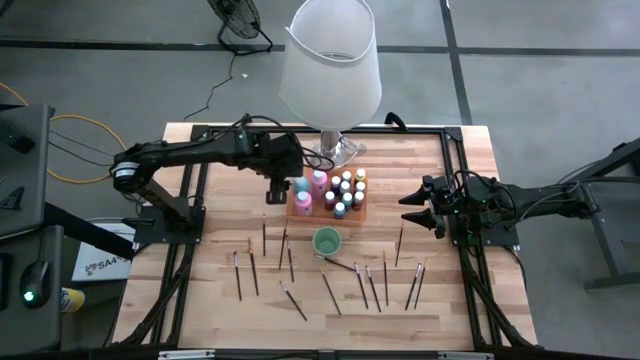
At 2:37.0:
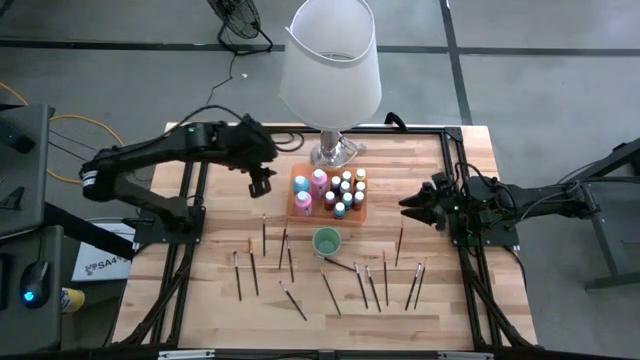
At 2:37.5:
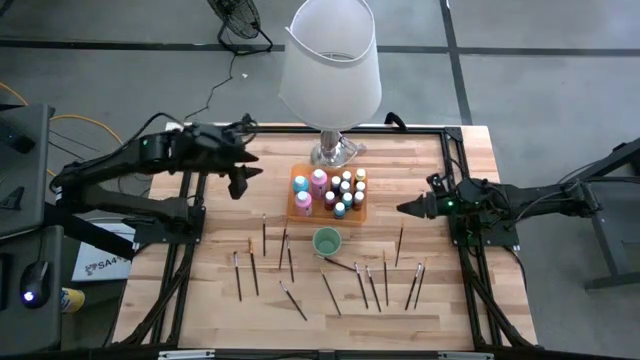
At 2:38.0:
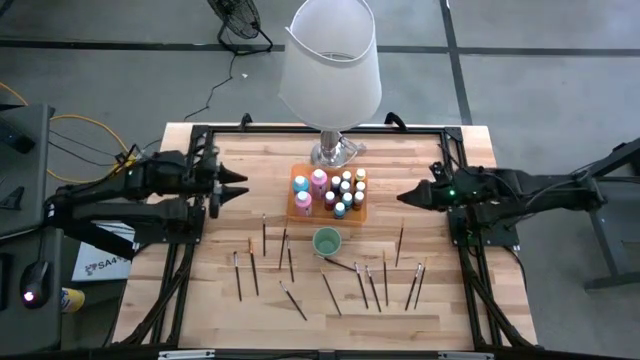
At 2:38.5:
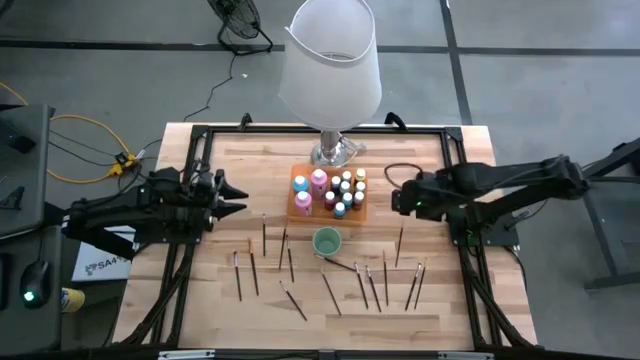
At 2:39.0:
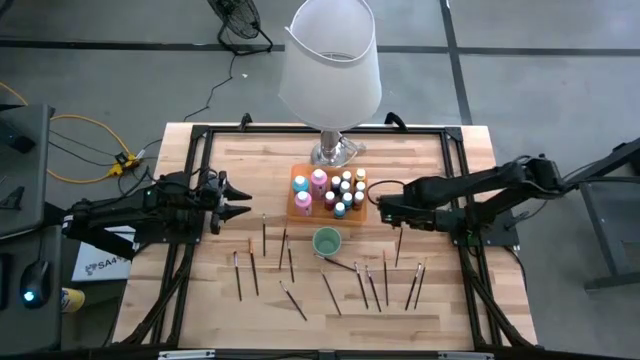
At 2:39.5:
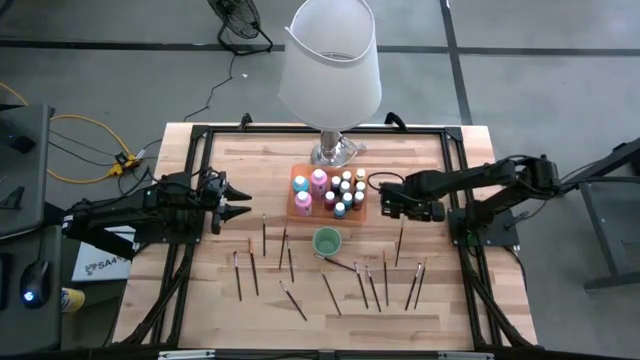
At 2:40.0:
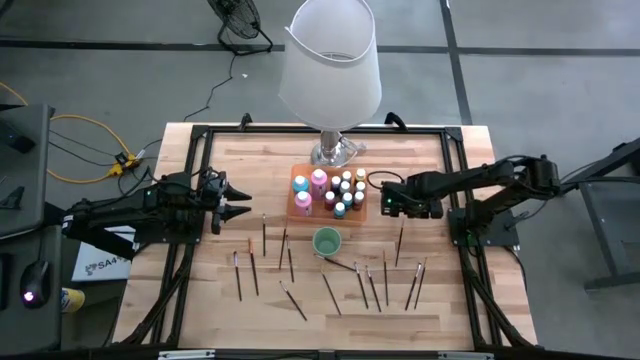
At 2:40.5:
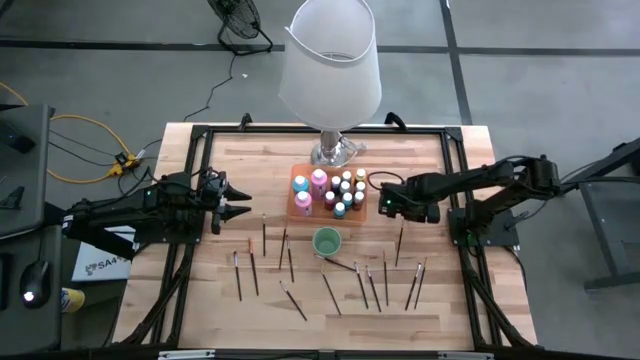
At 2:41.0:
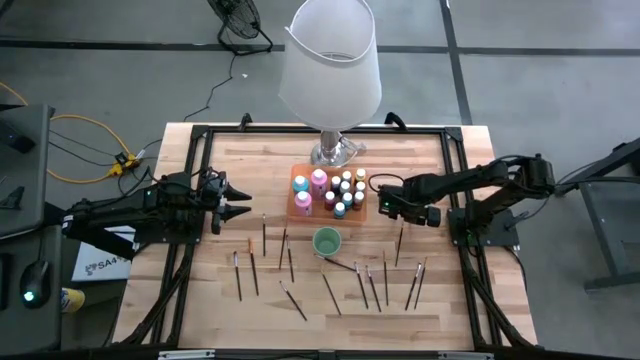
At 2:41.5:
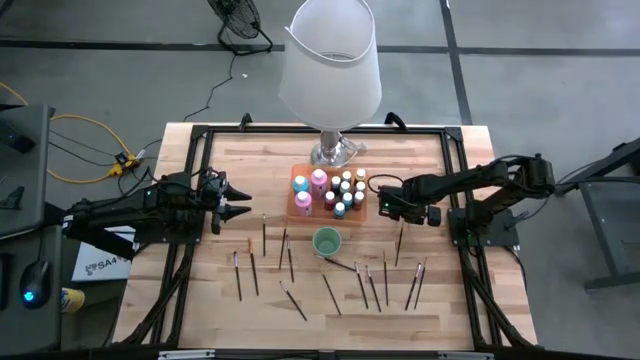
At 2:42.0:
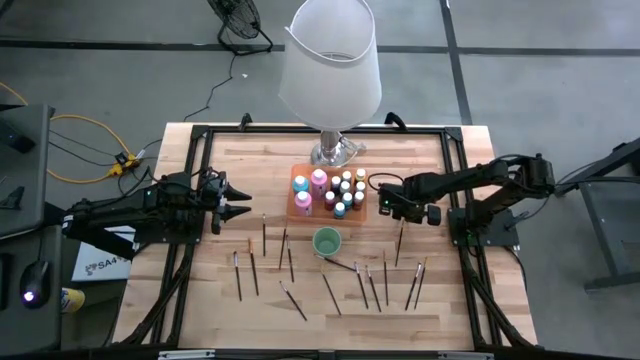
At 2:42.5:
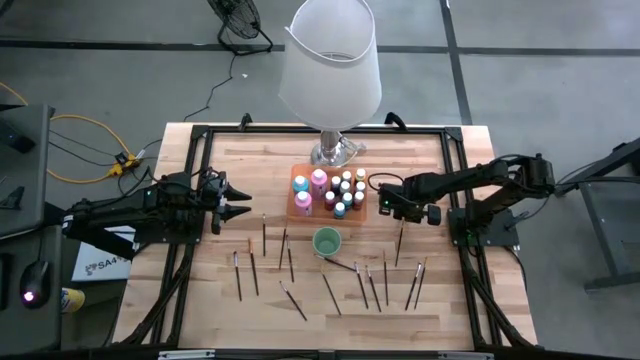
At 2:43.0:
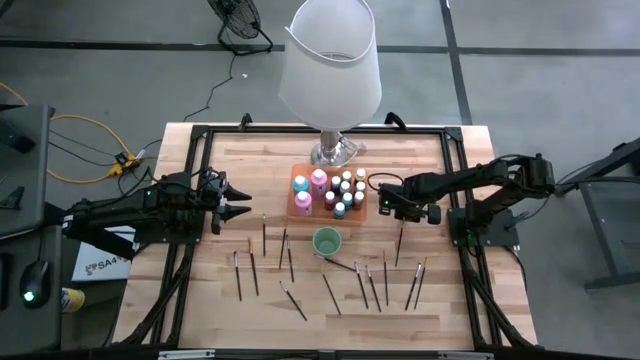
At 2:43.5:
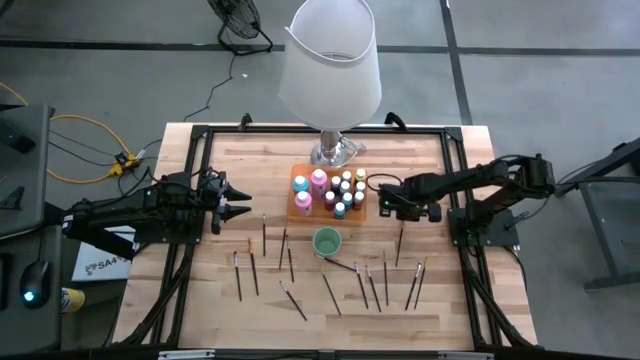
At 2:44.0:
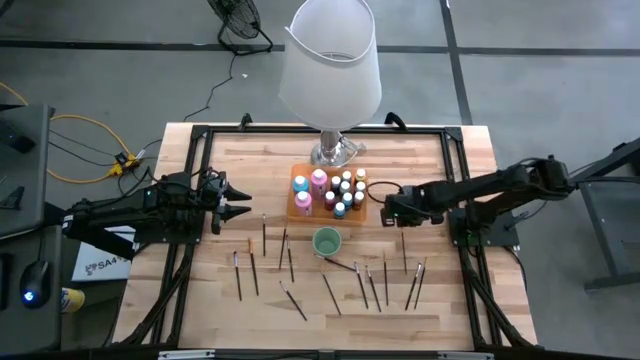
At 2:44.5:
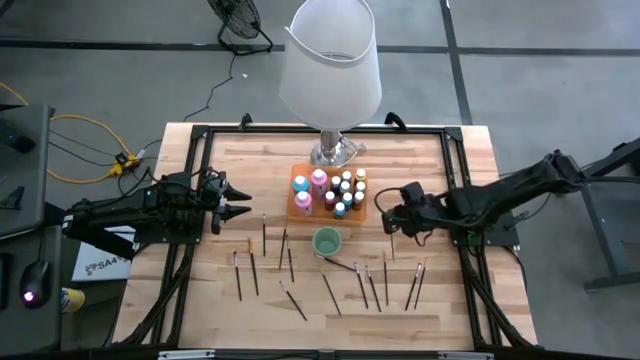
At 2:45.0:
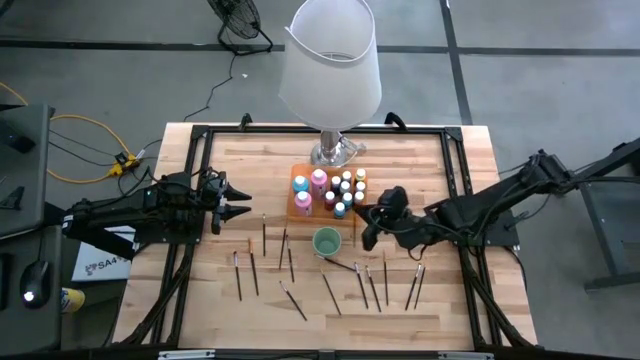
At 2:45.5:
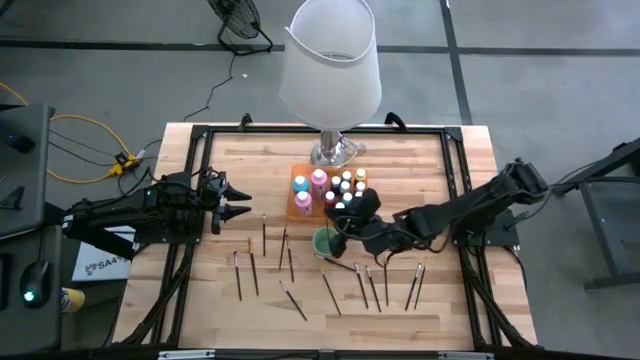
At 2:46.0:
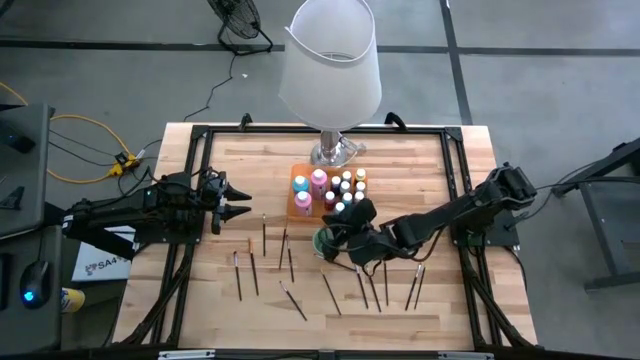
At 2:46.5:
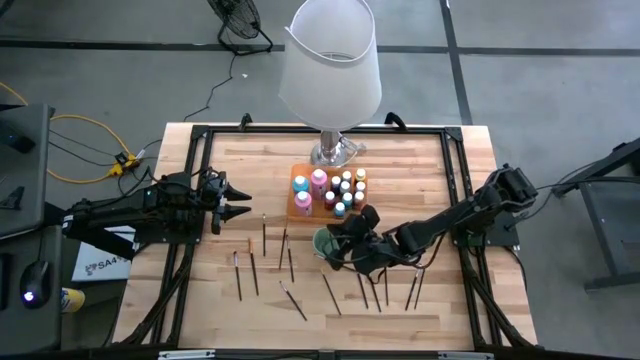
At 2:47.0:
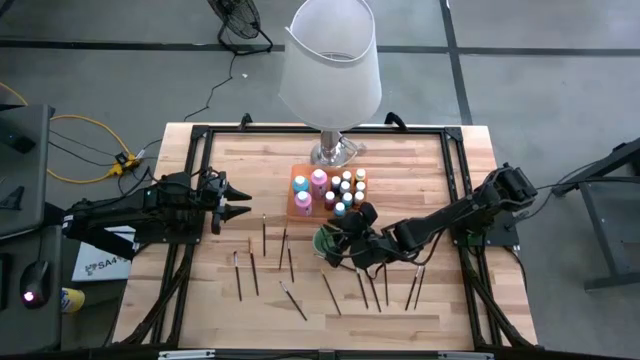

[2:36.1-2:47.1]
Task: Pick & Place Paint Supplies
Put the orange paintbrushes into the green cup

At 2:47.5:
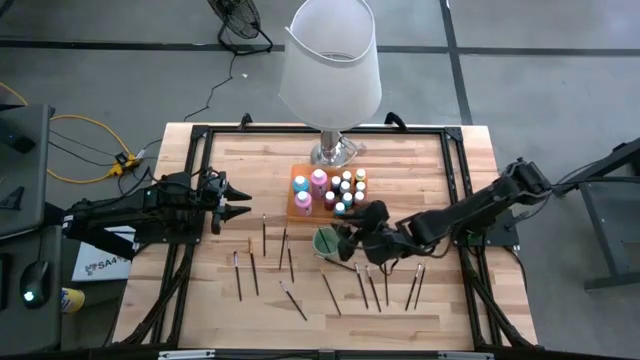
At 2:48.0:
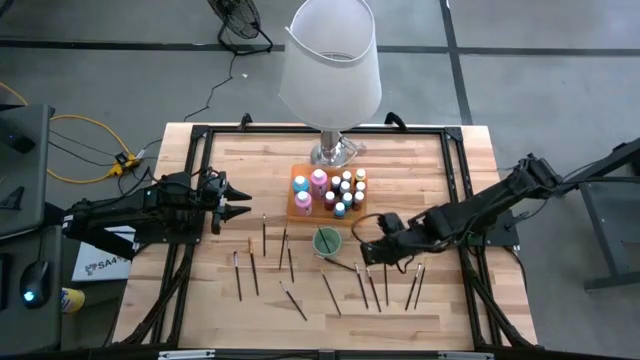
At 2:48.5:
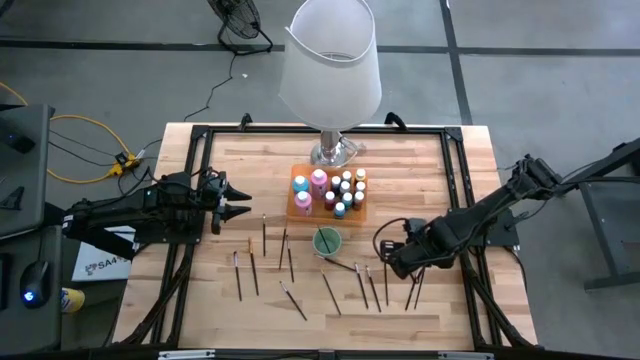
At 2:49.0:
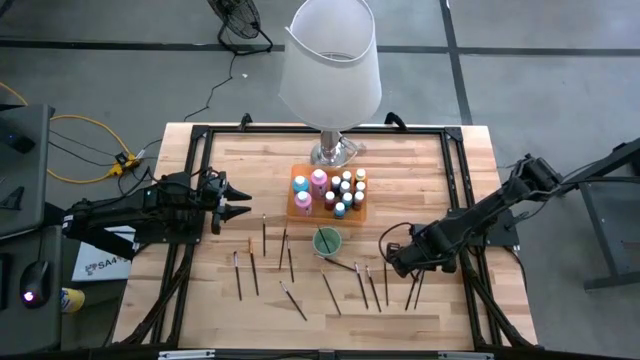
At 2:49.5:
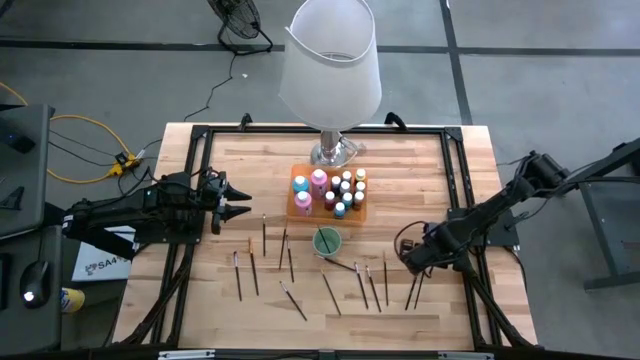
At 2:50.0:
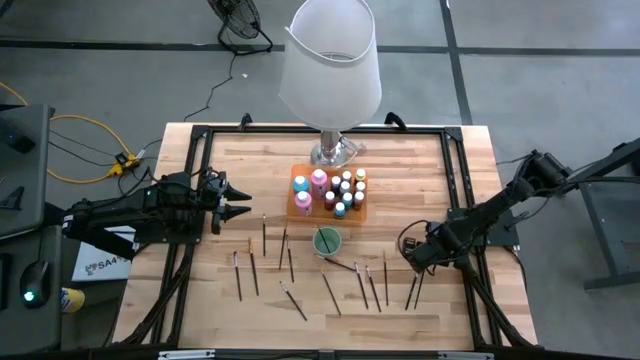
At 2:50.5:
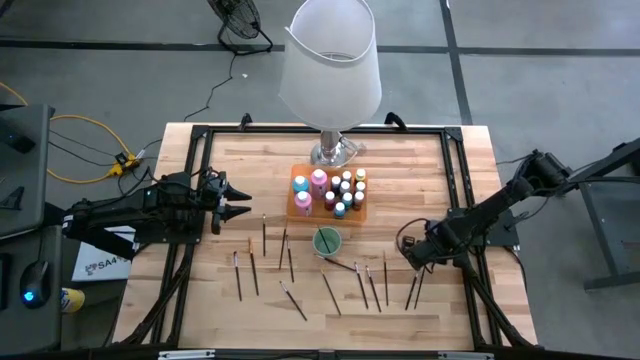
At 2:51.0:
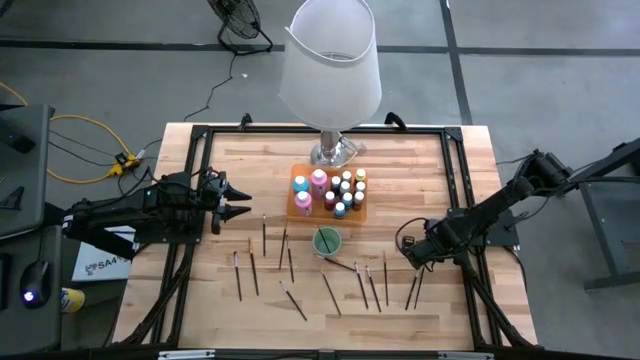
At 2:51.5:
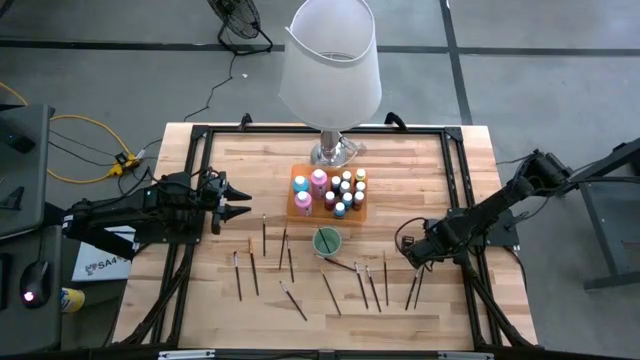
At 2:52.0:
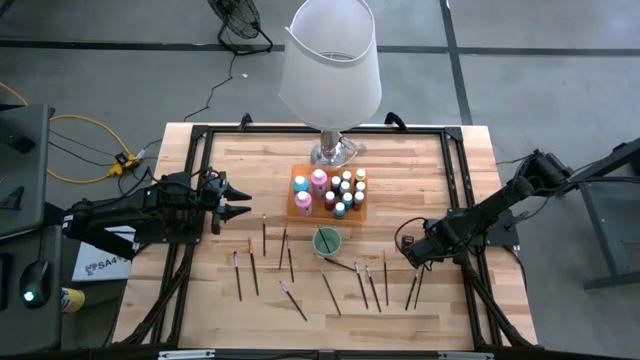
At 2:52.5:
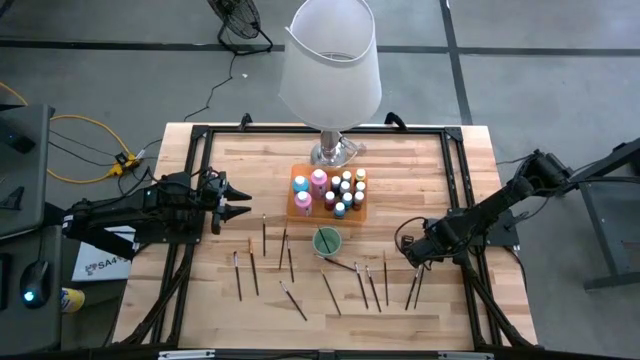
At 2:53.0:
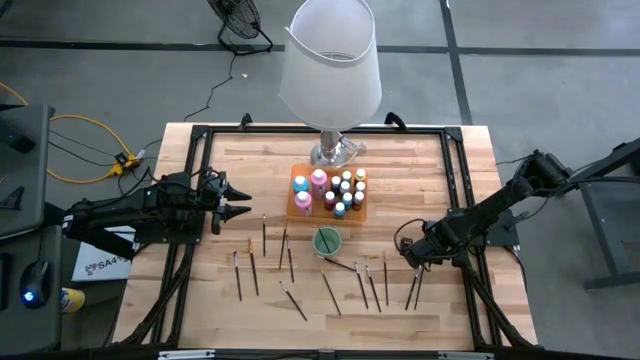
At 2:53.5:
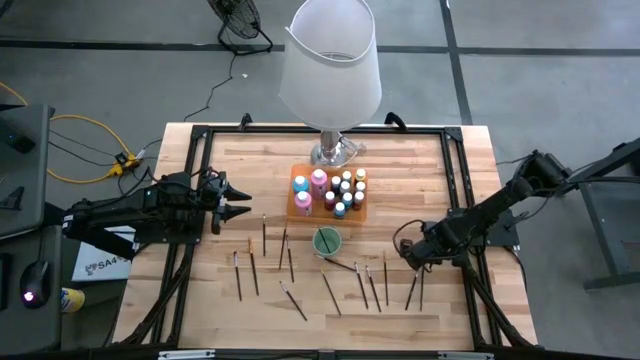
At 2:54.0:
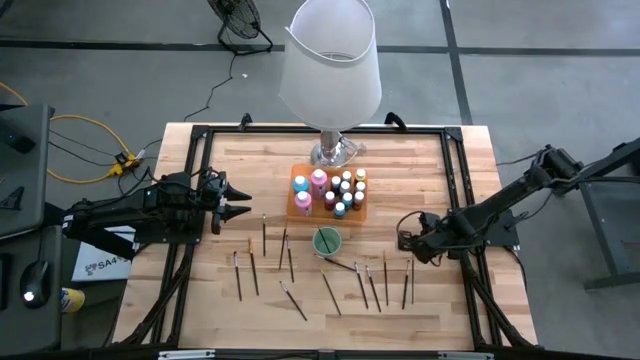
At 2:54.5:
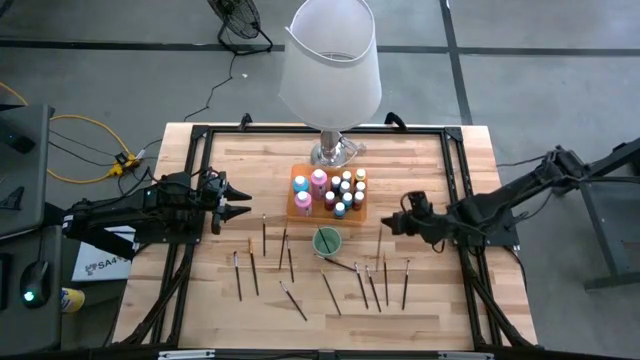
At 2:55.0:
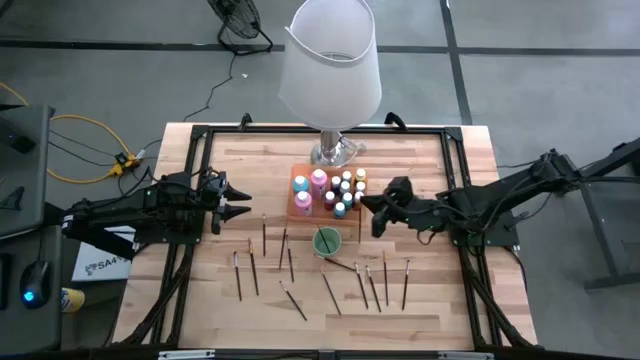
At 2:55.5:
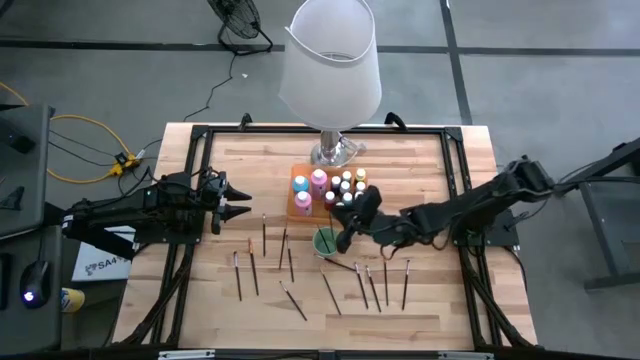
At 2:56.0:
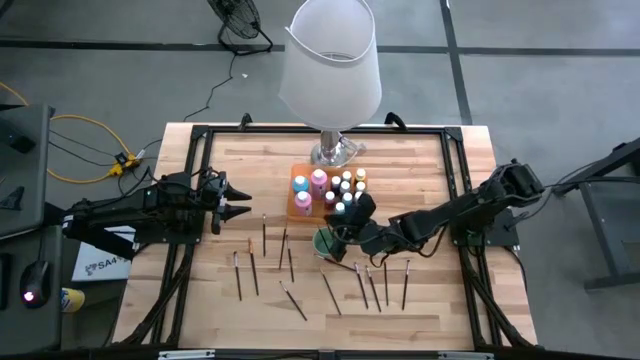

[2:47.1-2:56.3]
Put the orange paintbrushes into the green cup

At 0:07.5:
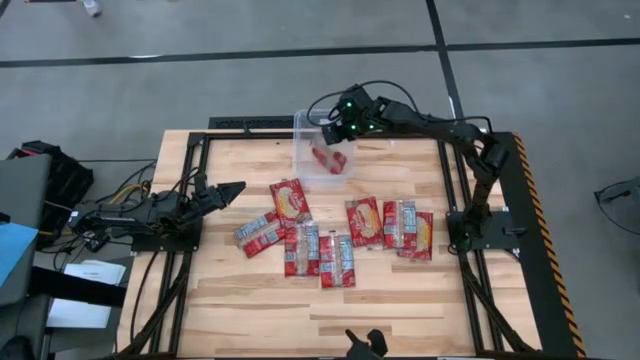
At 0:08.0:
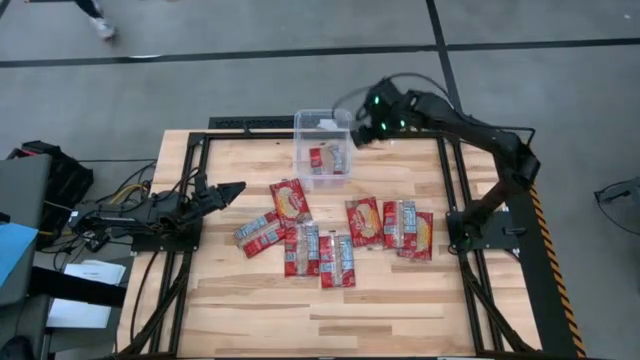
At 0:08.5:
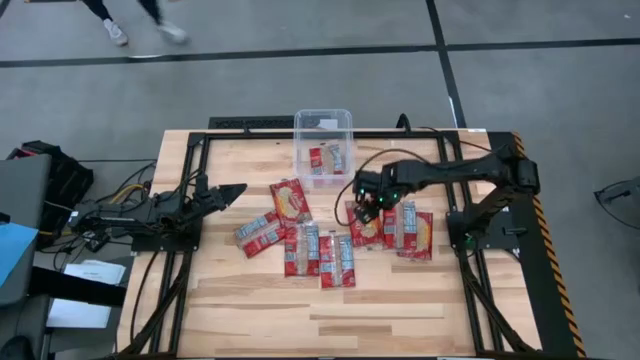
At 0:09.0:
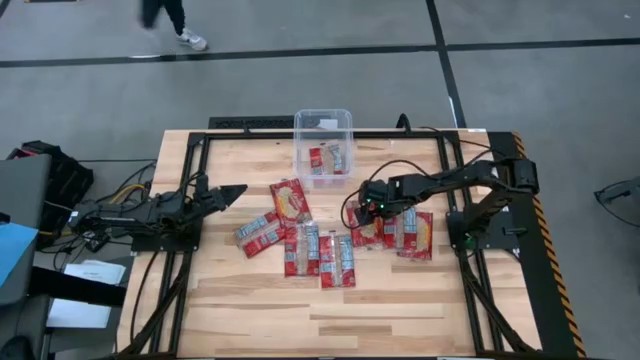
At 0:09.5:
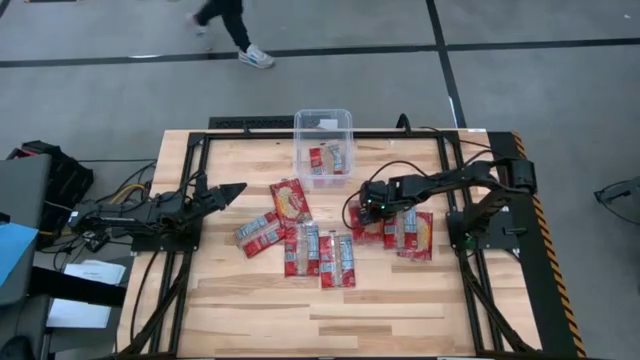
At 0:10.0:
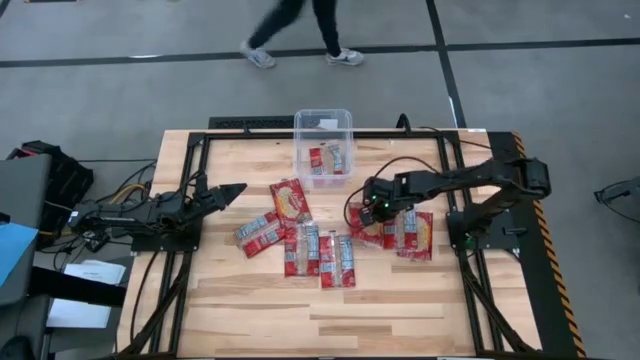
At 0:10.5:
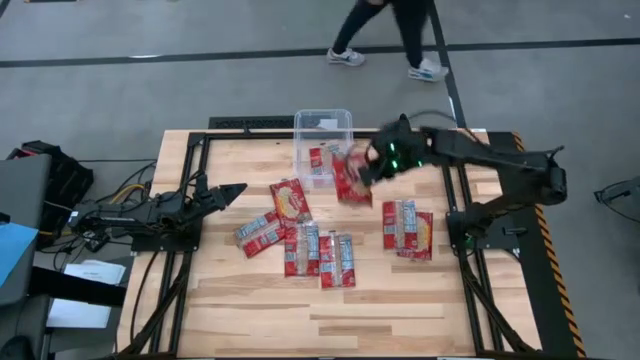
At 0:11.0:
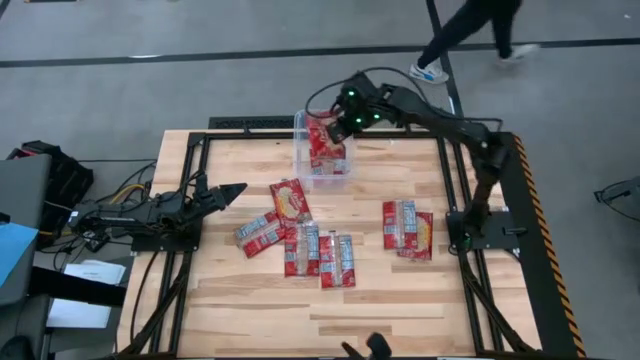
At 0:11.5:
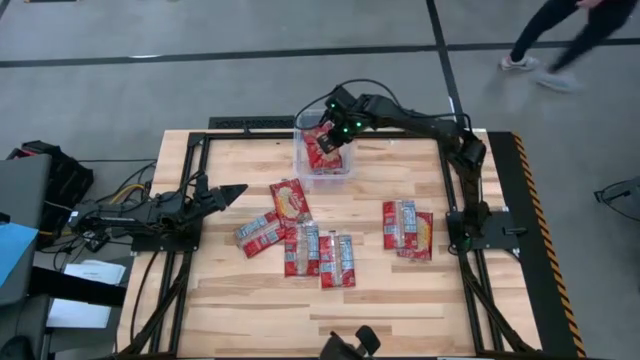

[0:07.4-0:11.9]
Task: Sort popcorn bags into baskets
Put the red popcorn bag into the transparent bin
